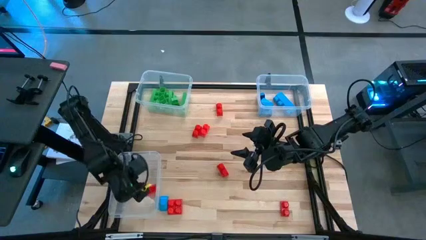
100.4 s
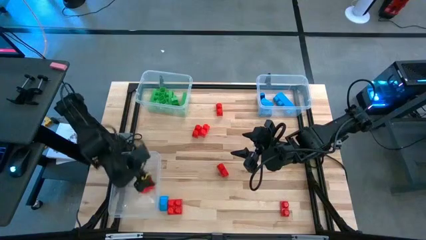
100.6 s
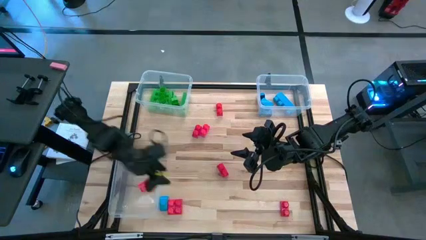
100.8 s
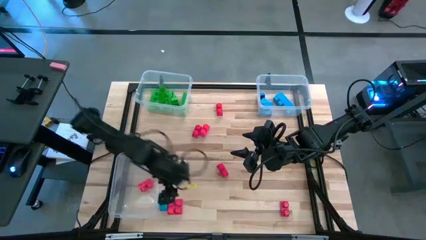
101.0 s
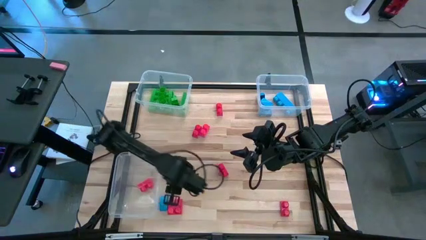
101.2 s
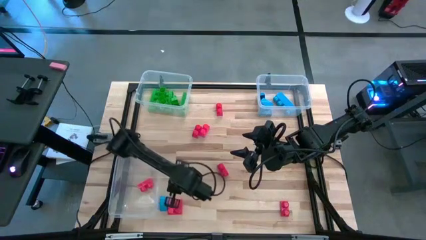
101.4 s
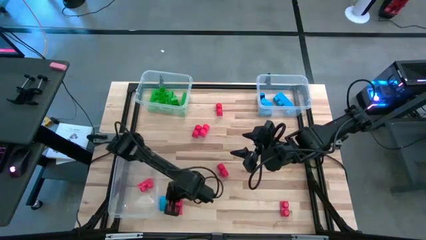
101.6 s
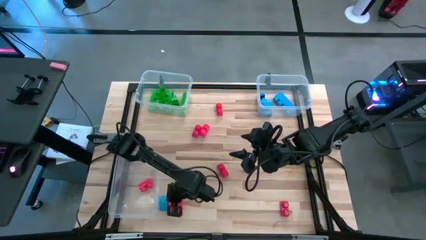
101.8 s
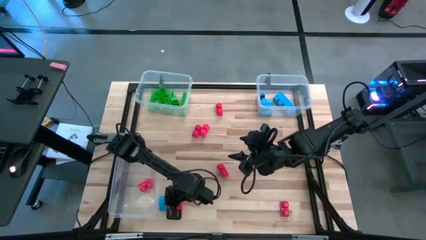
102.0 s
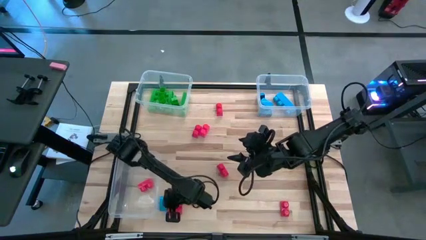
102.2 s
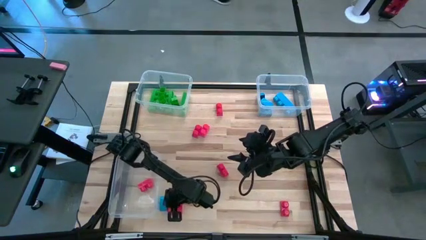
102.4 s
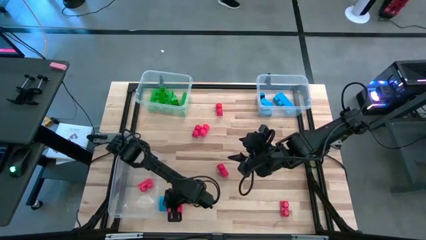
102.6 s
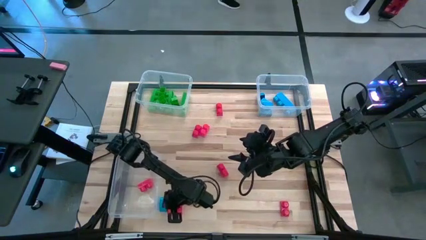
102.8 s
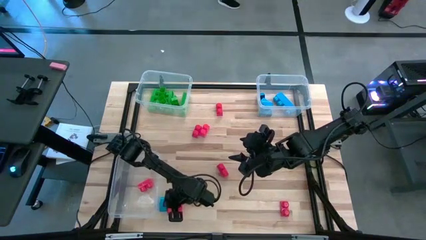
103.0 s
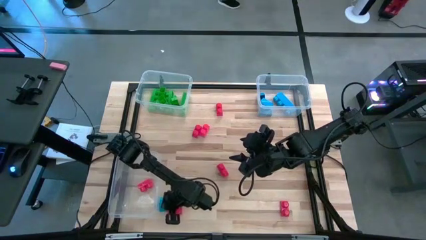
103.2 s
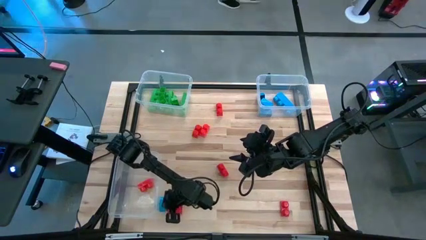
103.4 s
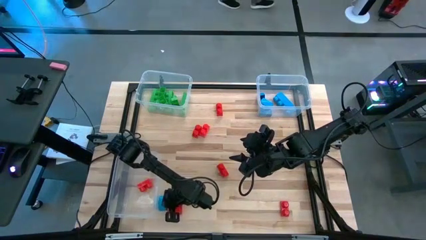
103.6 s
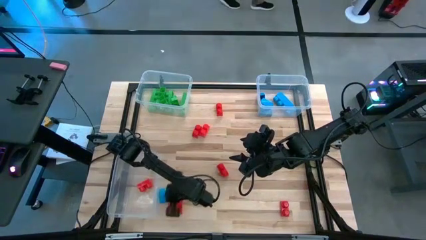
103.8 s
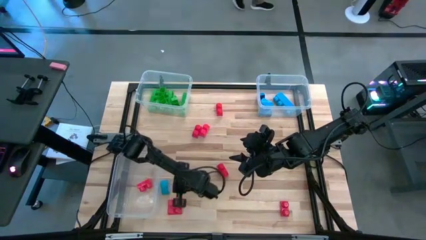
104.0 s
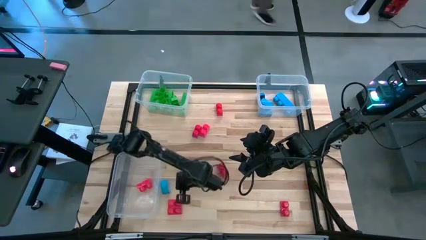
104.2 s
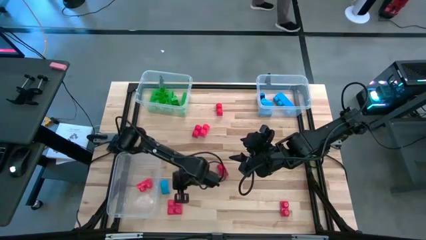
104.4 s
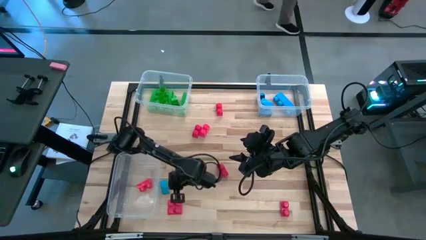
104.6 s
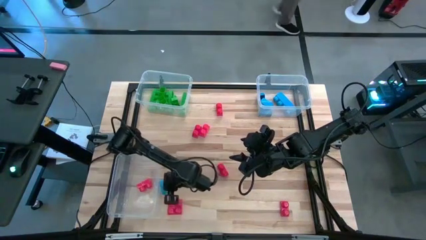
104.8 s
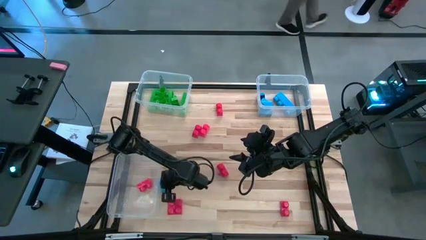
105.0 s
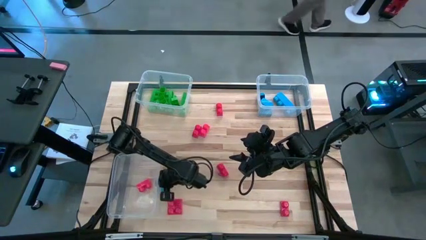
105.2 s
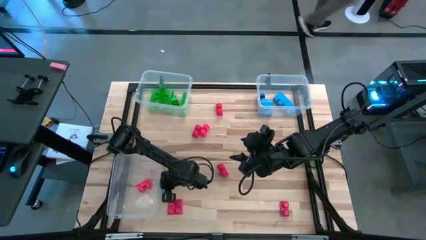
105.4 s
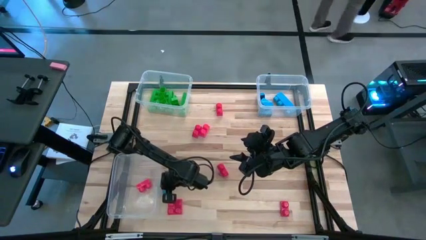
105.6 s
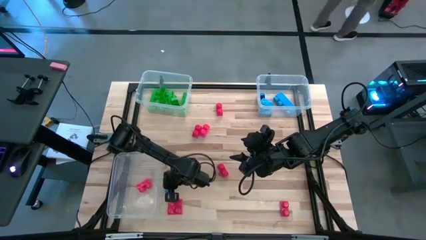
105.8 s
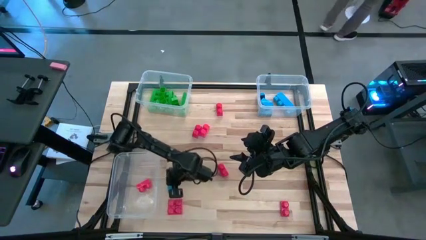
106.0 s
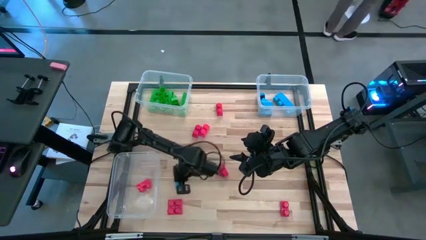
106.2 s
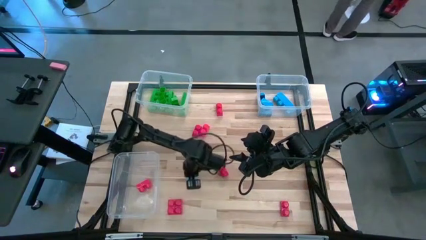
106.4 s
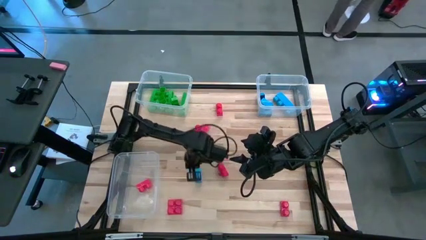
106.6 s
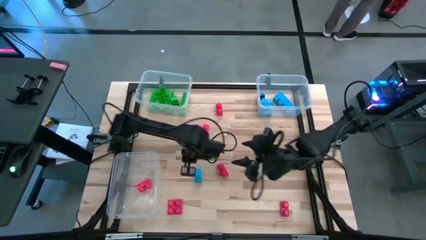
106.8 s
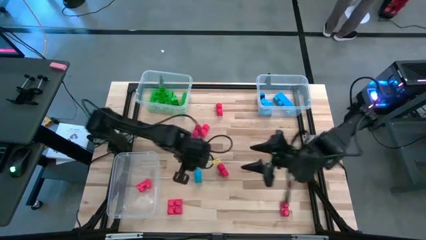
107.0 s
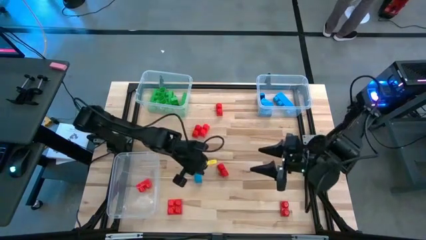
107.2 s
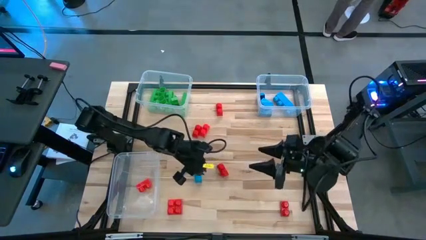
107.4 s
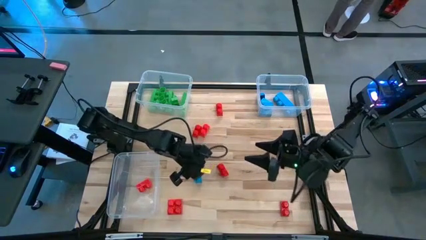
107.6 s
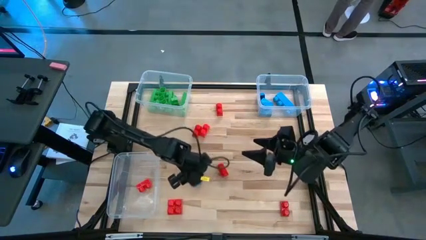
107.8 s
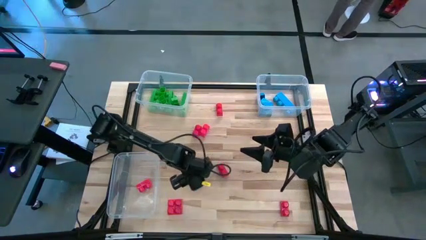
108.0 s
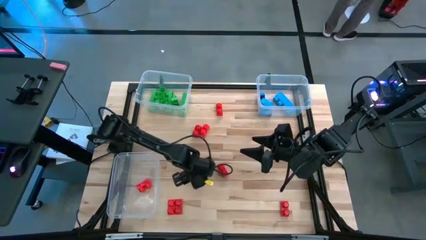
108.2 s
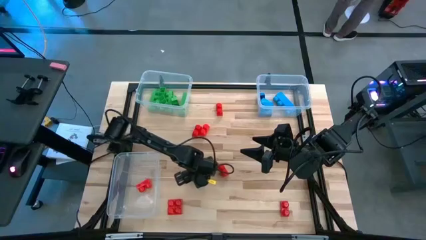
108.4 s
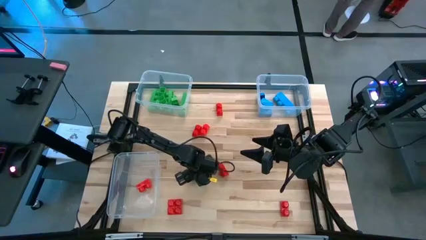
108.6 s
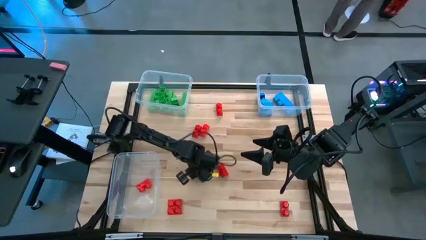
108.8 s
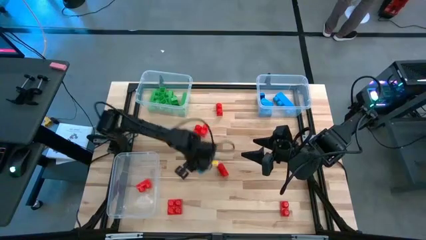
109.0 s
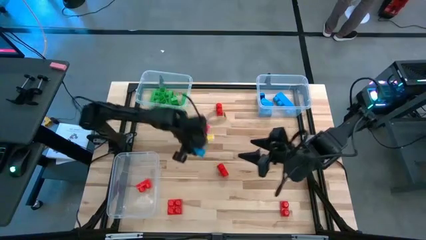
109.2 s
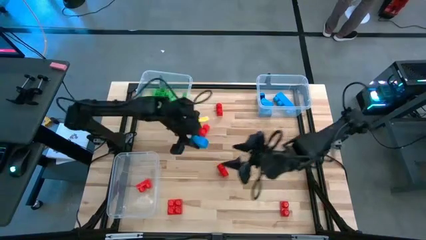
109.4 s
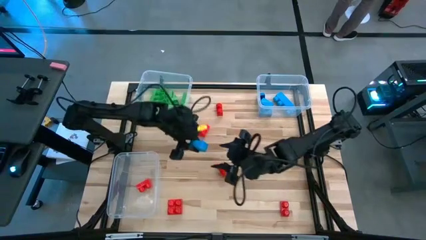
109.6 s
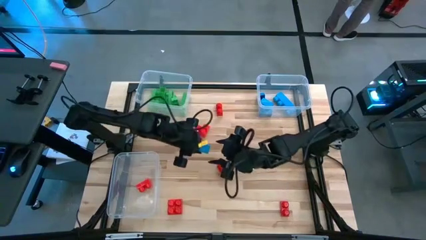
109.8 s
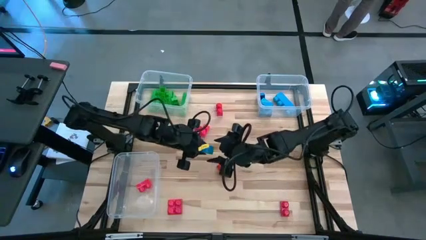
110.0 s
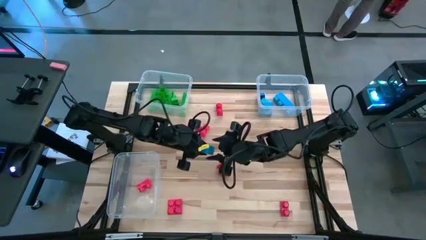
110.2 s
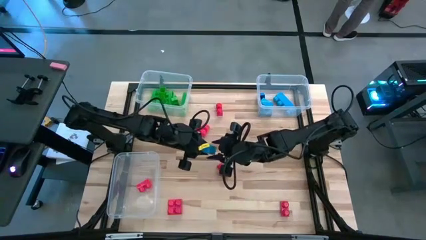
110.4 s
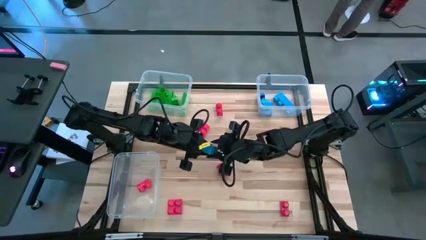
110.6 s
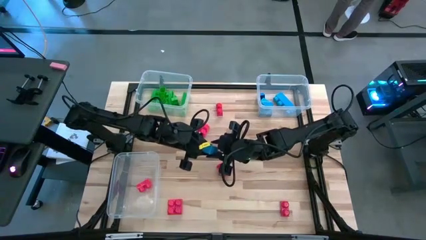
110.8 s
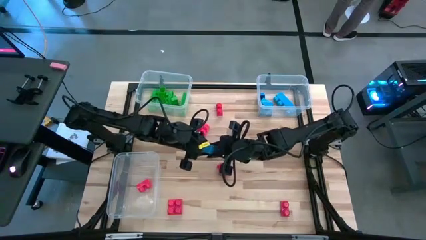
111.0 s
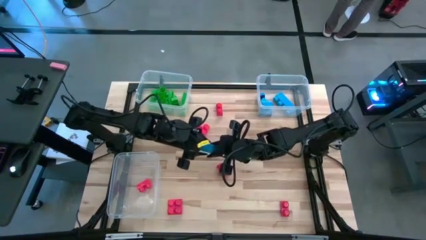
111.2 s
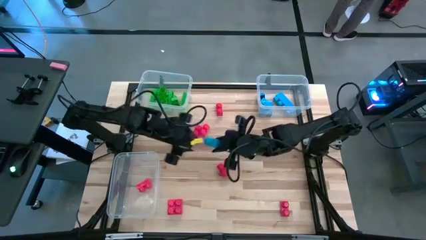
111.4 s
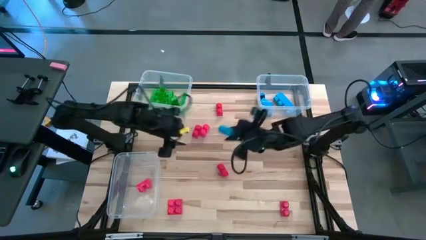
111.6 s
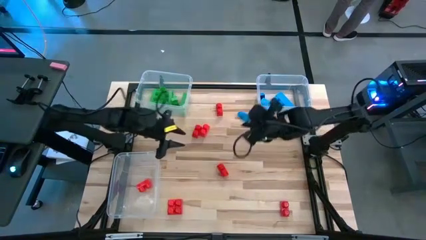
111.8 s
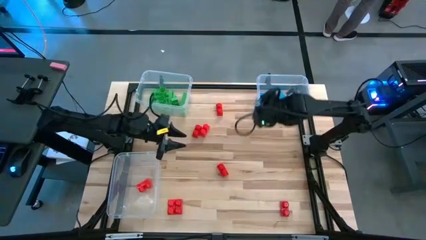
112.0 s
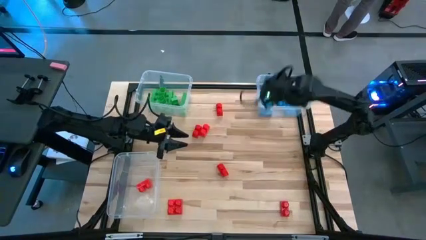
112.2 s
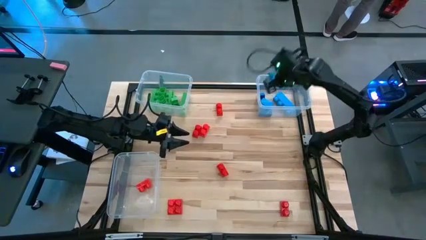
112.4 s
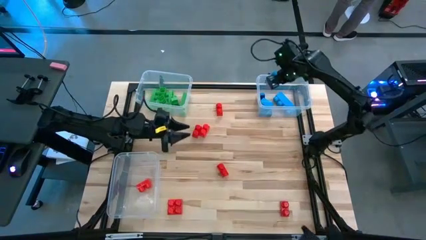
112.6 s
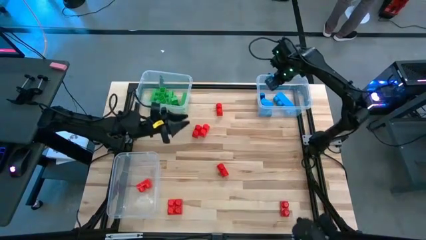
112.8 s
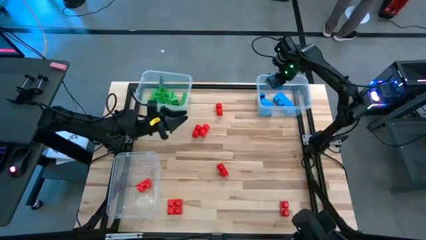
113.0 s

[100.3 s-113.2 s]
Task: Sort blocks
Put the blue game piece into the top right transparent bin

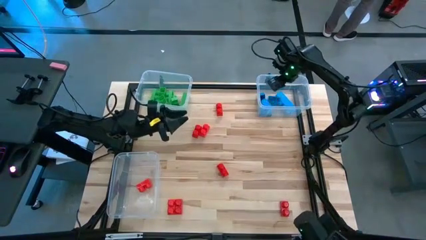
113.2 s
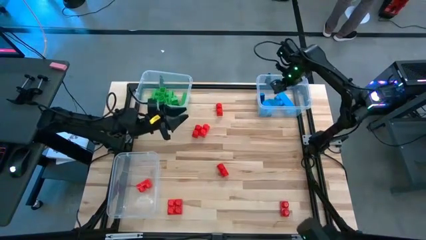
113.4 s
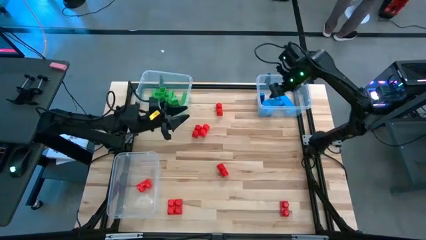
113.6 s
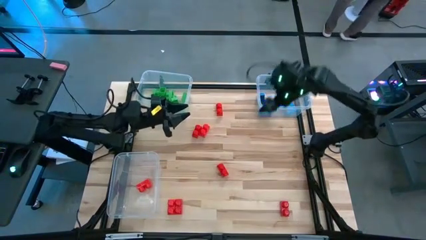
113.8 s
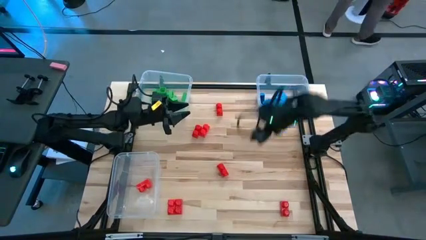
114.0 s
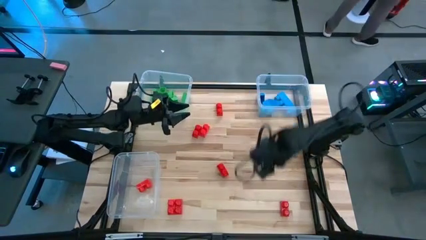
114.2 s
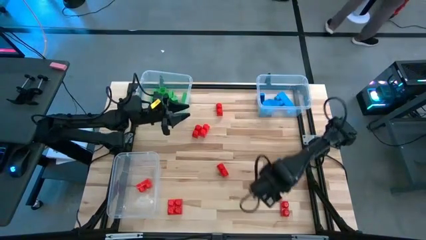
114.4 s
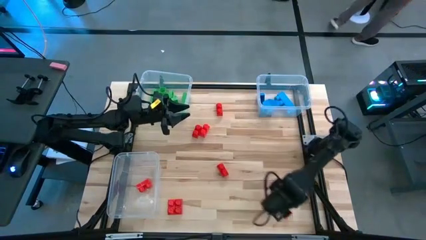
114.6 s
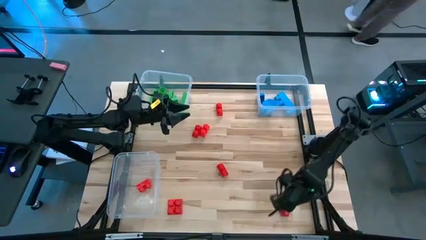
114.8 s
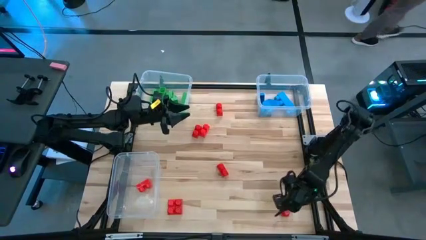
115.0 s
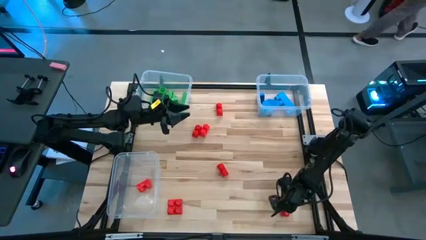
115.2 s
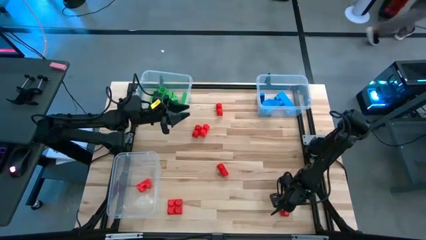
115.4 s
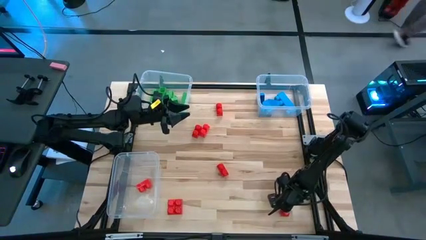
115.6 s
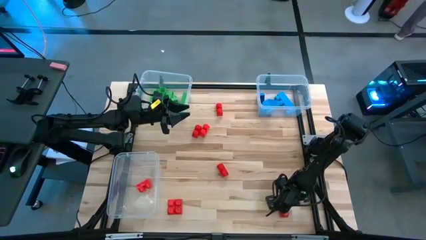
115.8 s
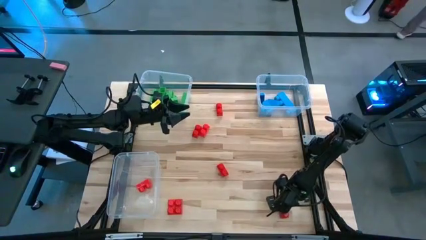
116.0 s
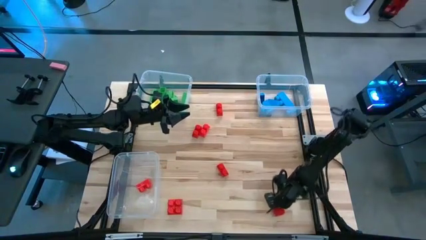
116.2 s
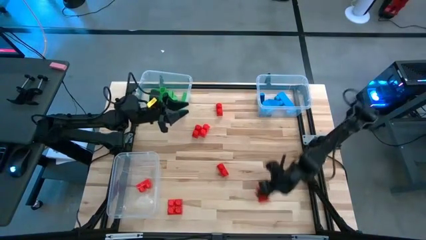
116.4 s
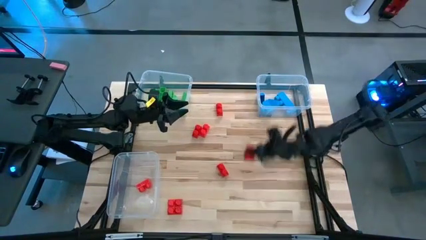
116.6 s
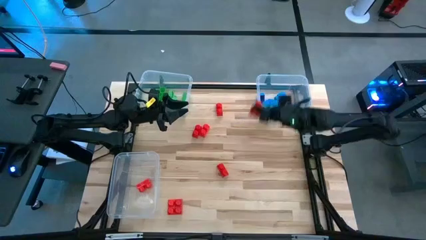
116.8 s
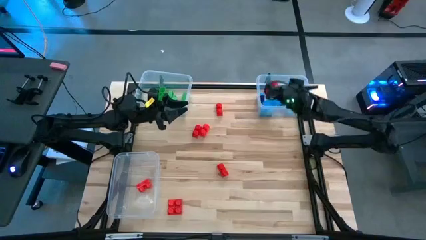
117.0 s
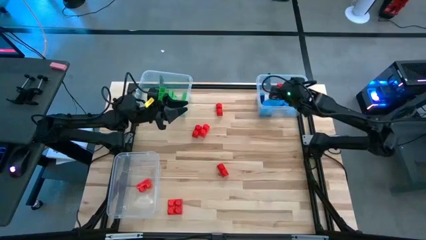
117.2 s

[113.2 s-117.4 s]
Put the red game piece into the bottom transparent bin
